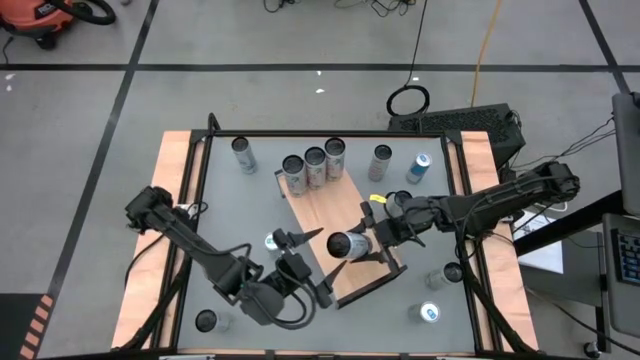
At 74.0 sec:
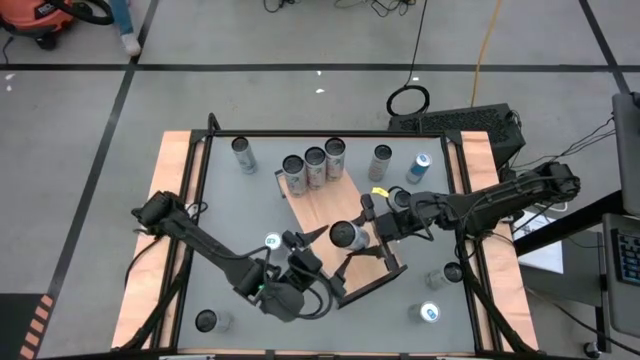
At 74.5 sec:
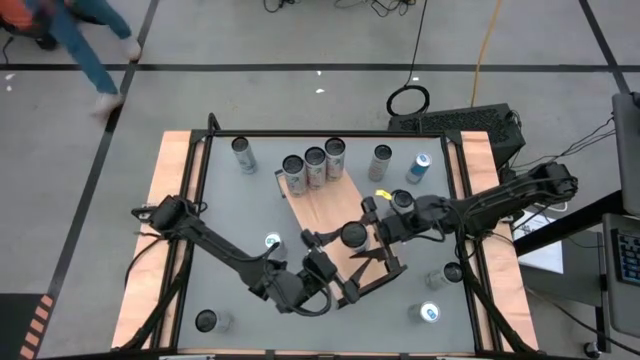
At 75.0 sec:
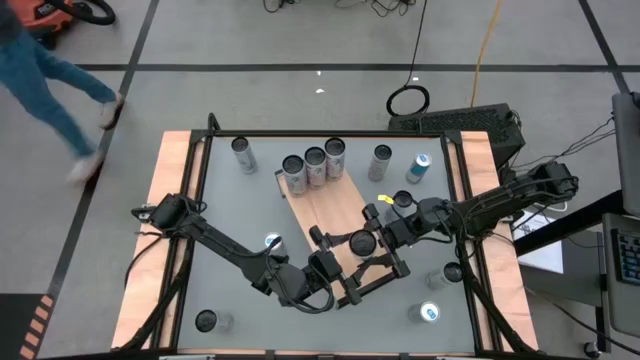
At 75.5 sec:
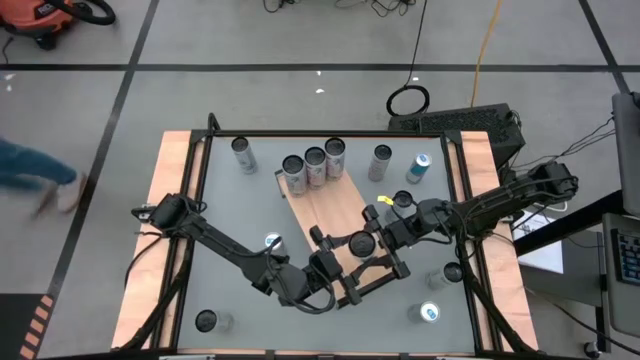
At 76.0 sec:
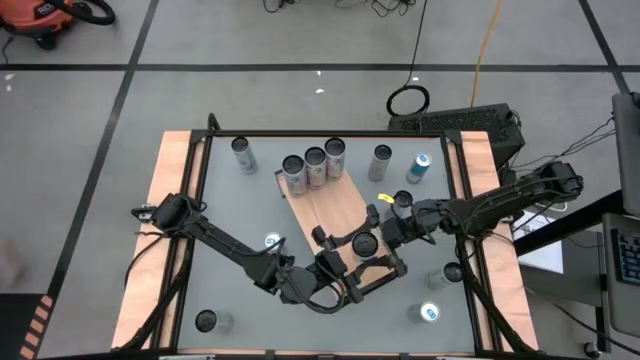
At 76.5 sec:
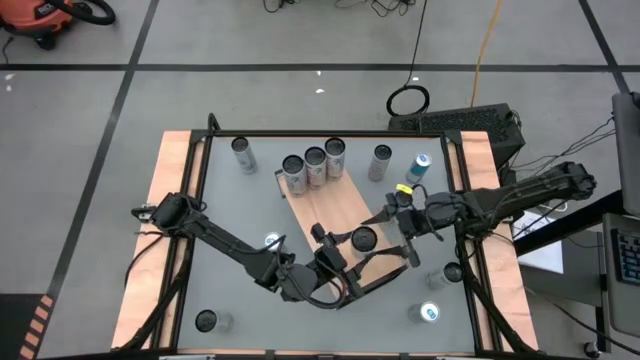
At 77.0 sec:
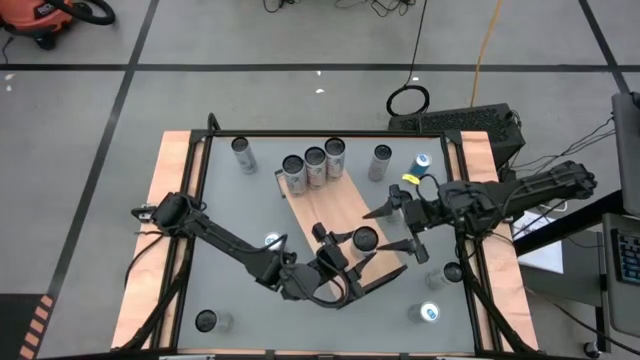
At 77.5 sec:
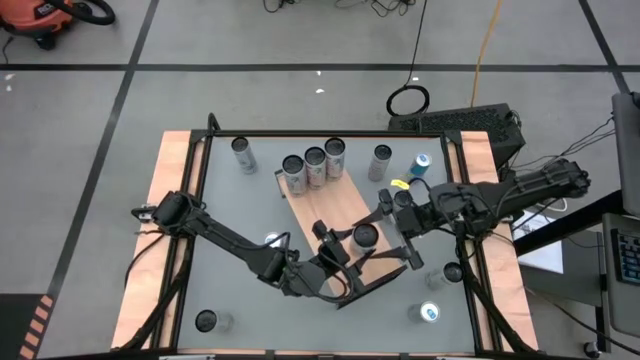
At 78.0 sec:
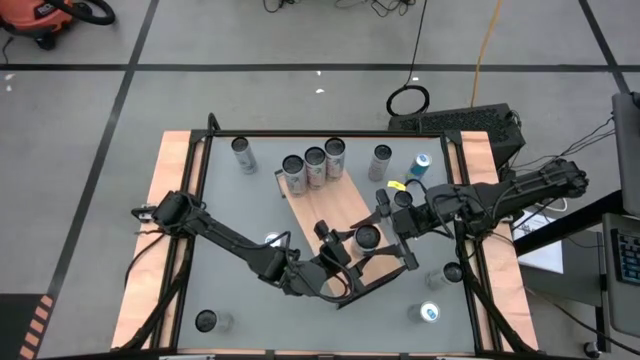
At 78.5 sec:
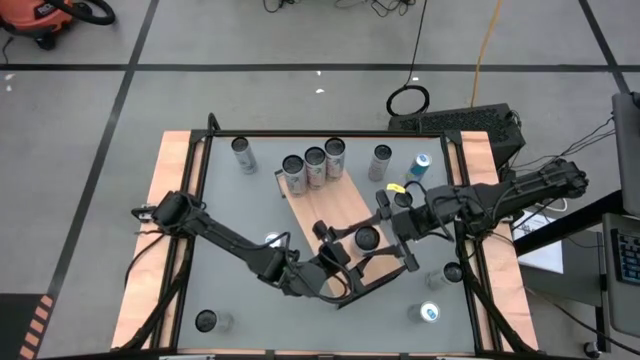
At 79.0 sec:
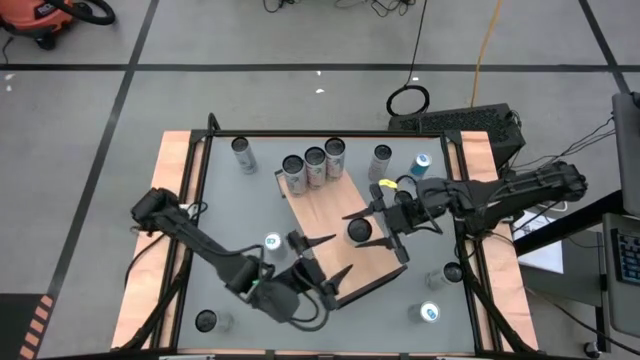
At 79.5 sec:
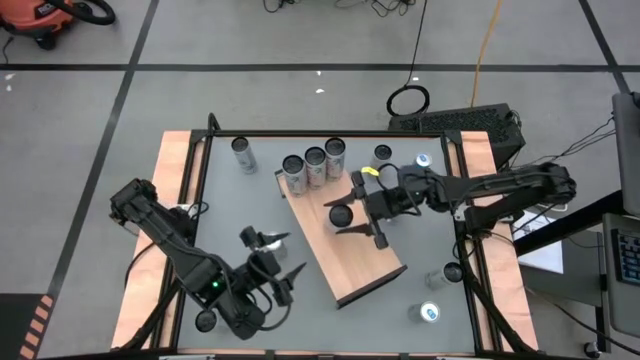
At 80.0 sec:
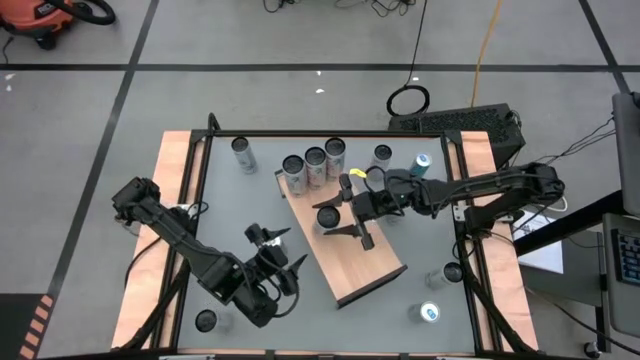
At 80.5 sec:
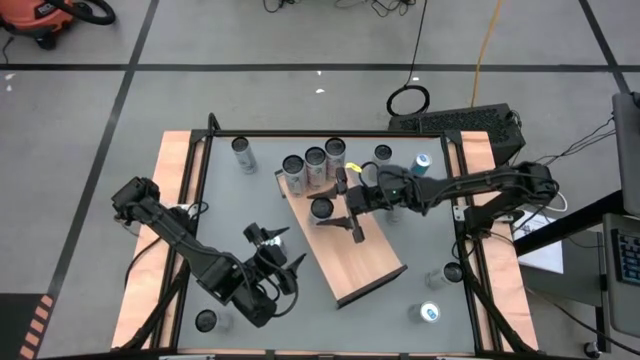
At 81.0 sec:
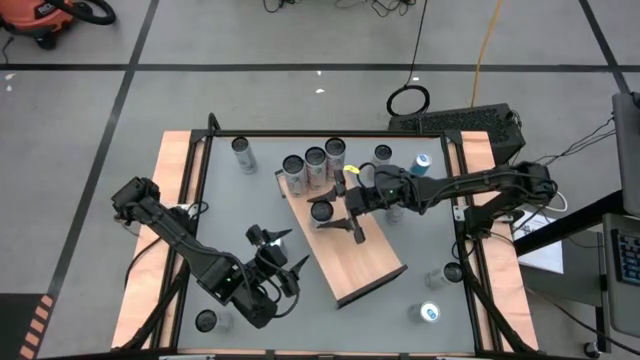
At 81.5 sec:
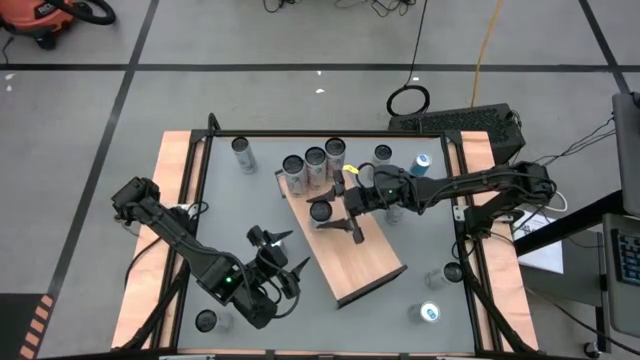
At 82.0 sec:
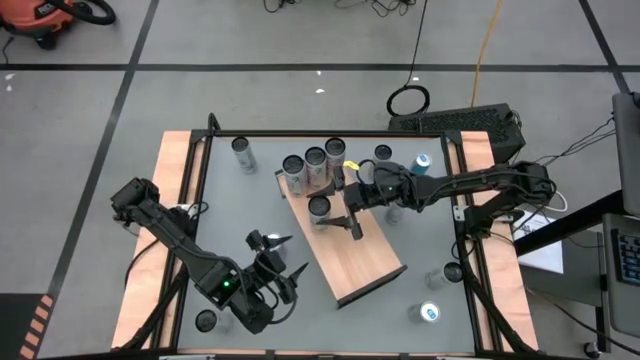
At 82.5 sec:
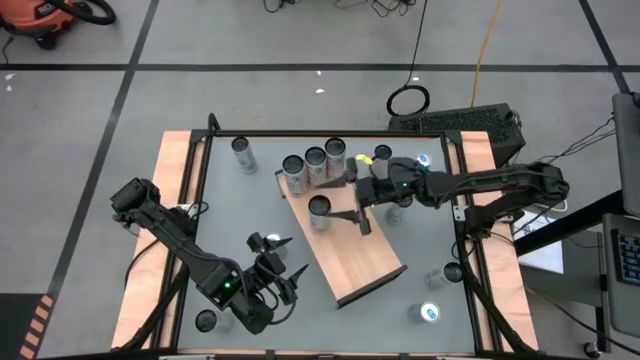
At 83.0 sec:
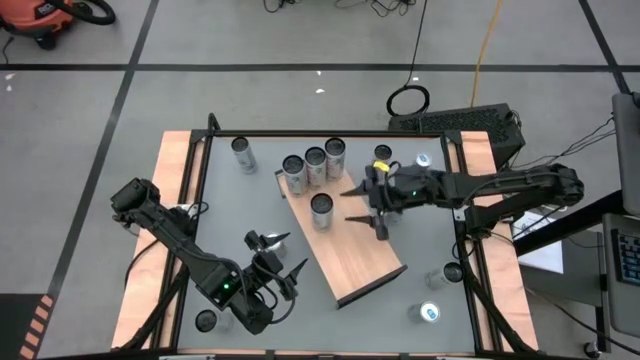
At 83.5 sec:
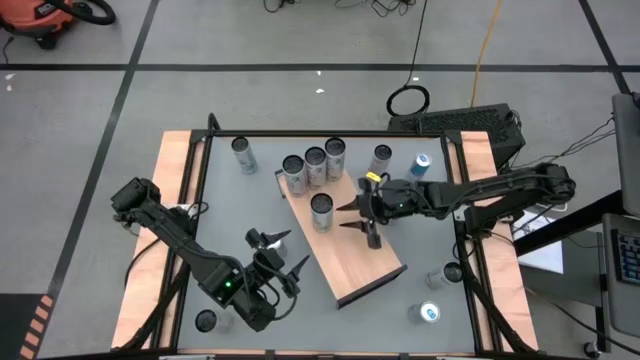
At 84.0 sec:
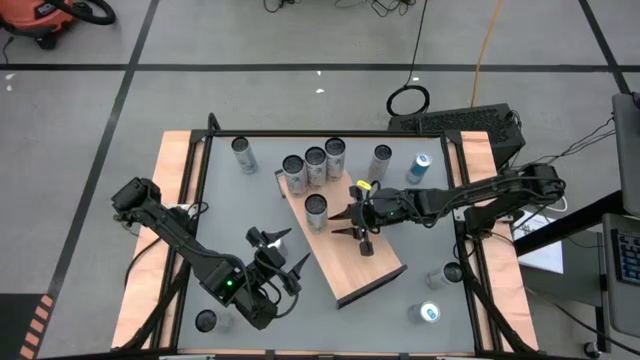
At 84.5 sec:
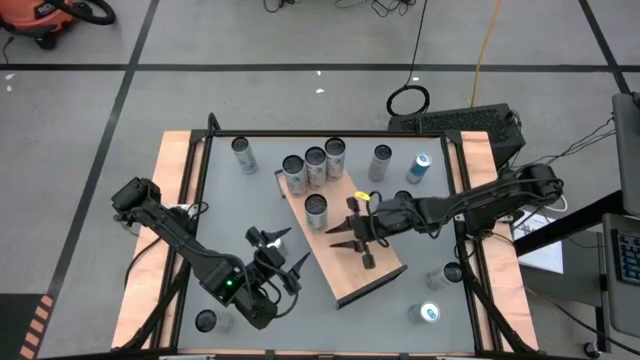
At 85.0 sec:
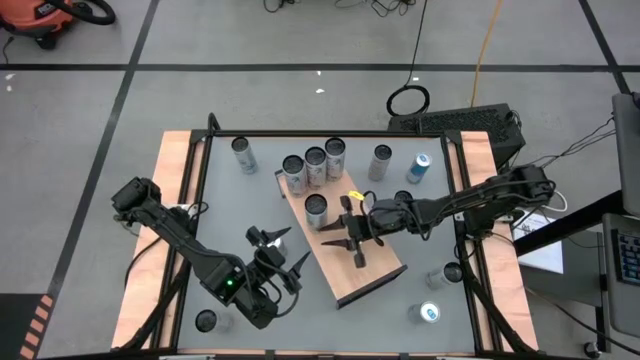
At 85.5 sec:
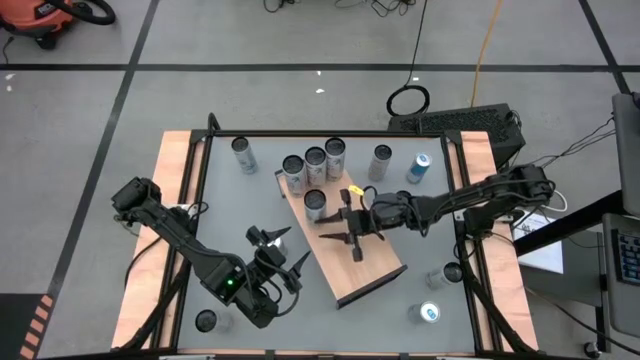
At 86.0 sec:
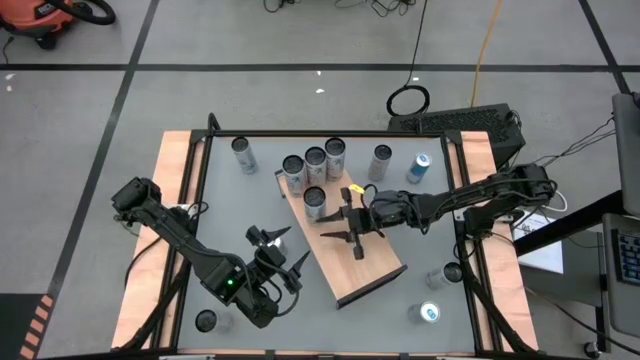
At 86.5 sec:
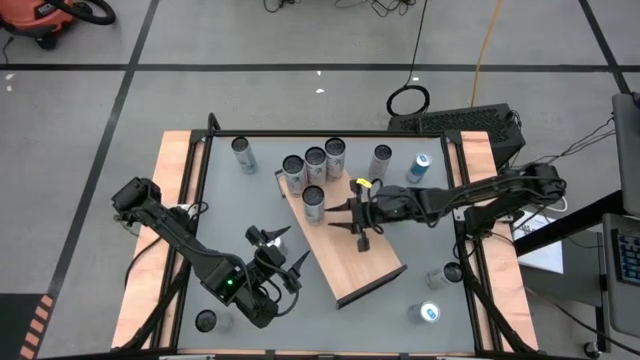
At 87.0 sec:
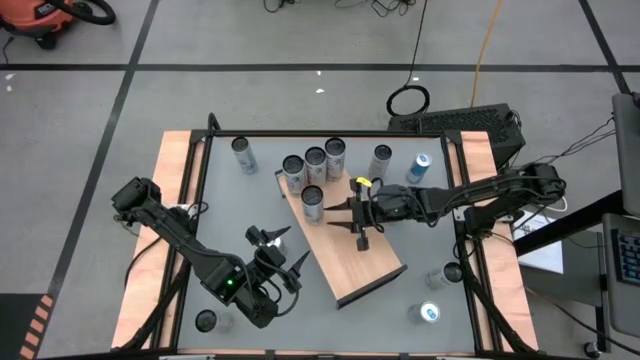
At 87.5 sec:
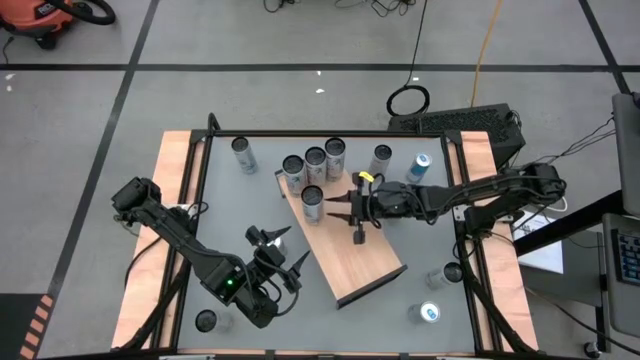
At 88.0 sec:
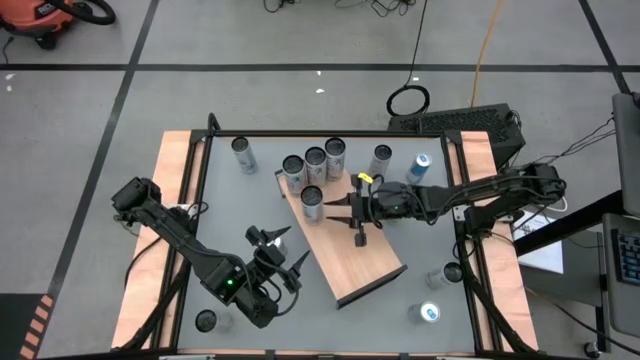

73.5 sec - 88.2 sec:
Task: Place canned beverage on shelf
Put the bottom left white-blue soda can on the shelf
